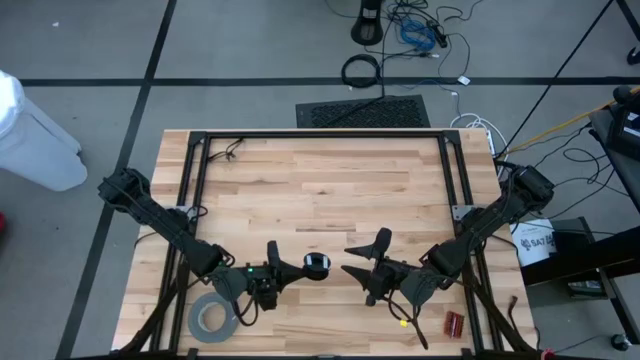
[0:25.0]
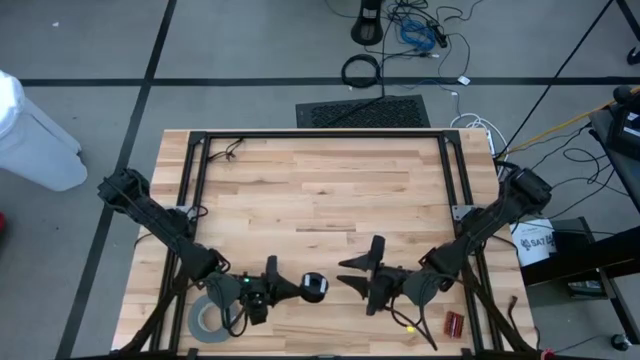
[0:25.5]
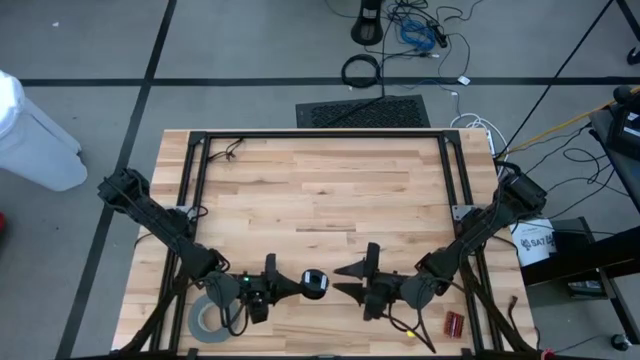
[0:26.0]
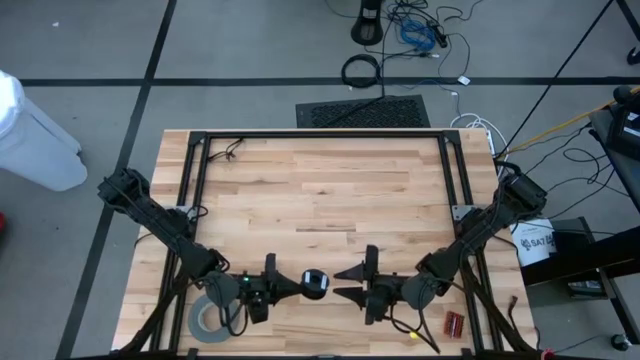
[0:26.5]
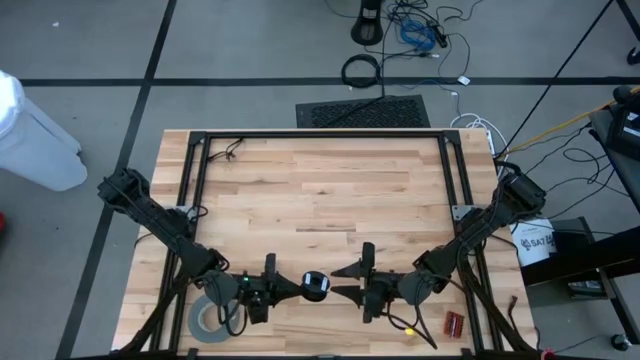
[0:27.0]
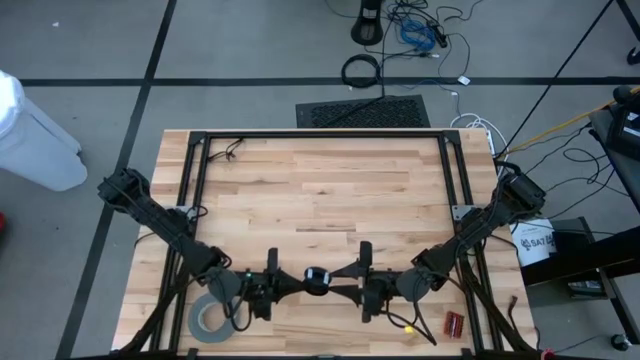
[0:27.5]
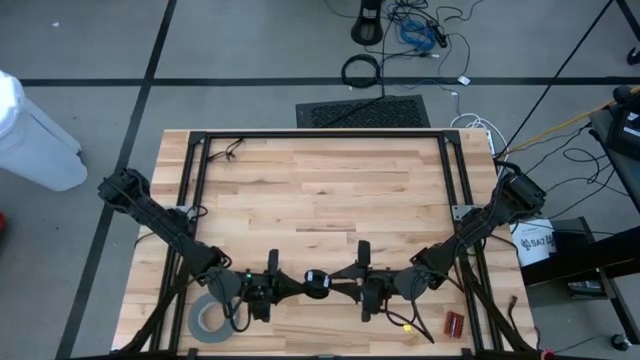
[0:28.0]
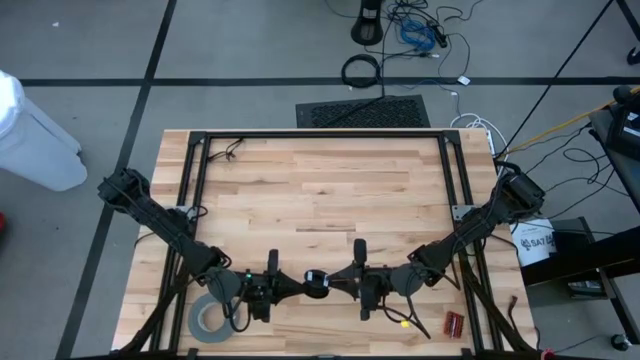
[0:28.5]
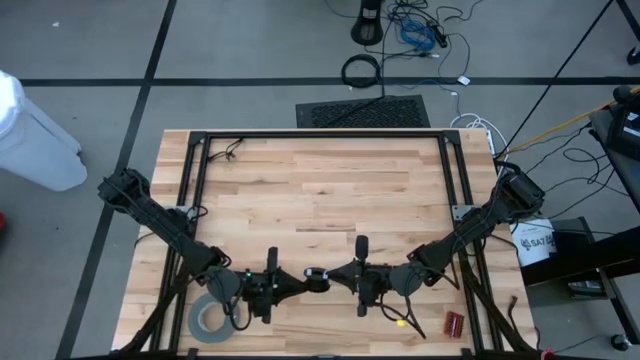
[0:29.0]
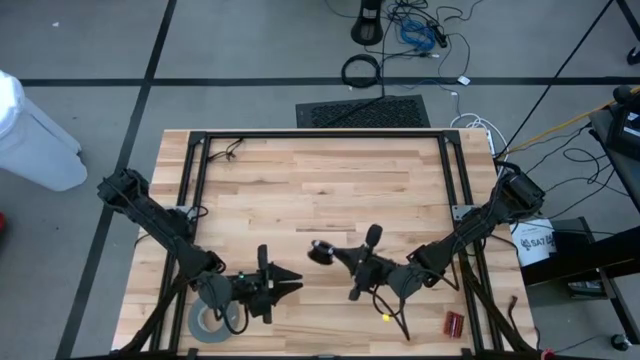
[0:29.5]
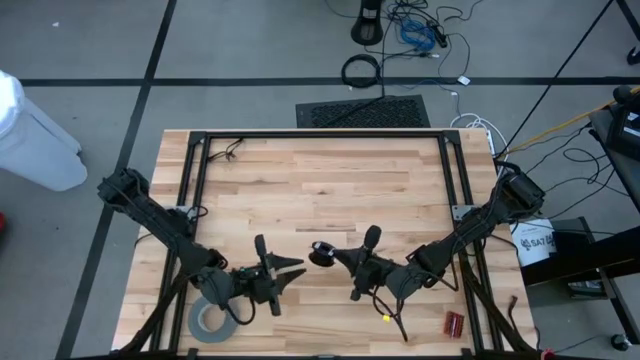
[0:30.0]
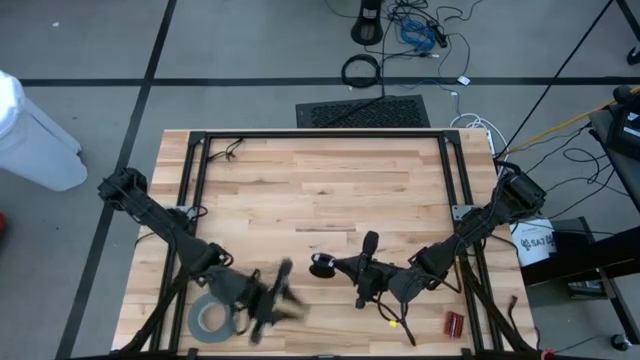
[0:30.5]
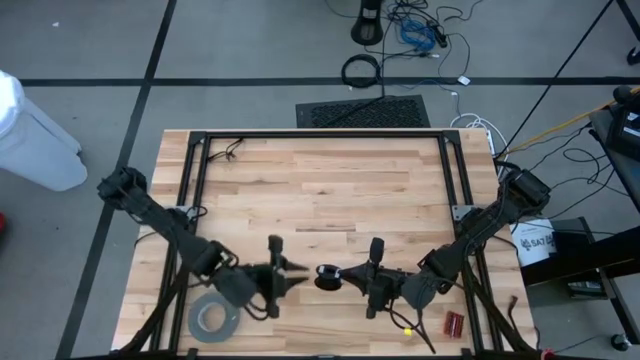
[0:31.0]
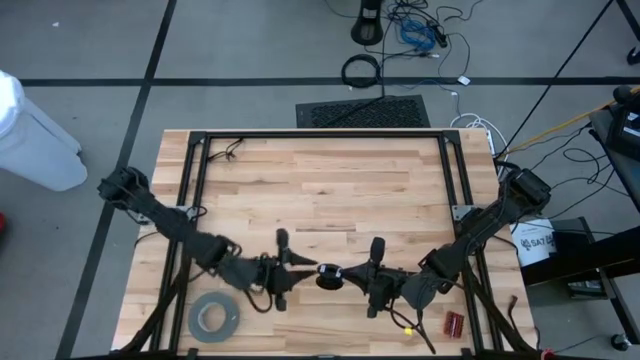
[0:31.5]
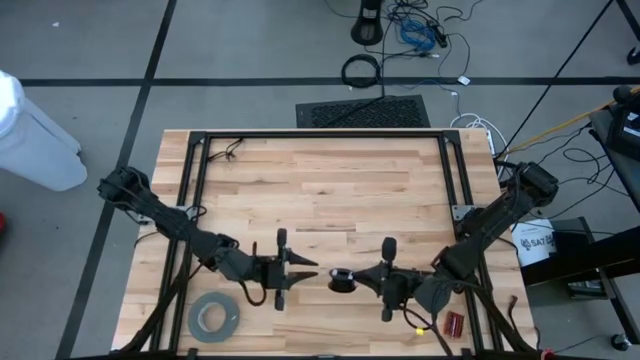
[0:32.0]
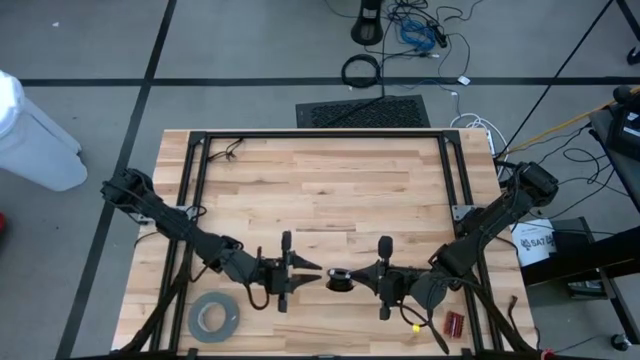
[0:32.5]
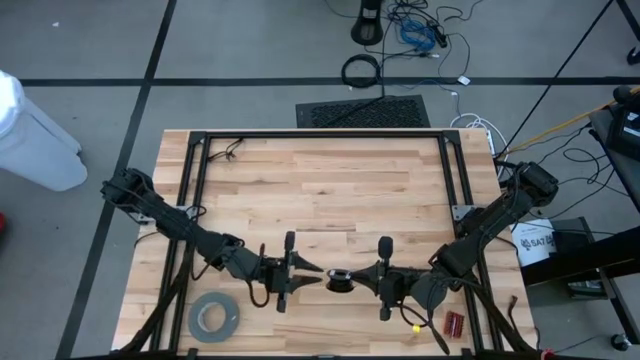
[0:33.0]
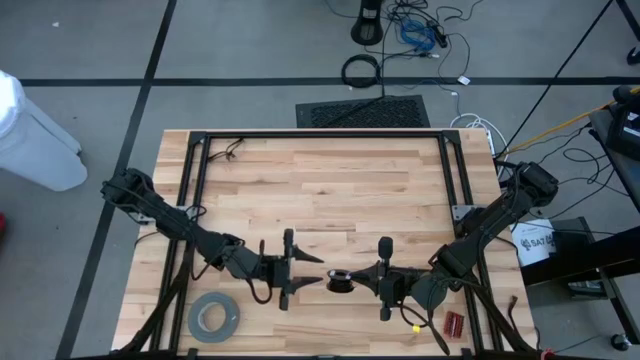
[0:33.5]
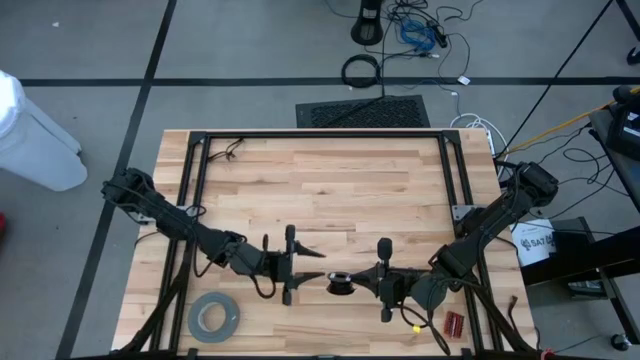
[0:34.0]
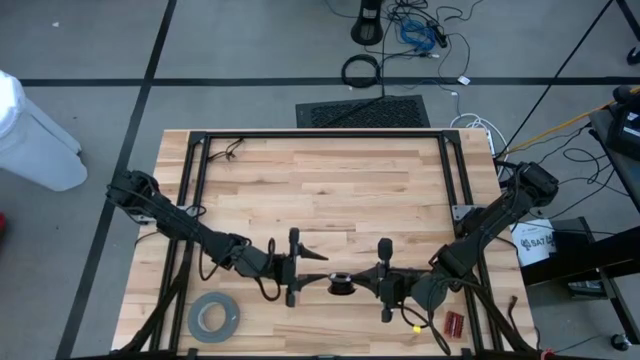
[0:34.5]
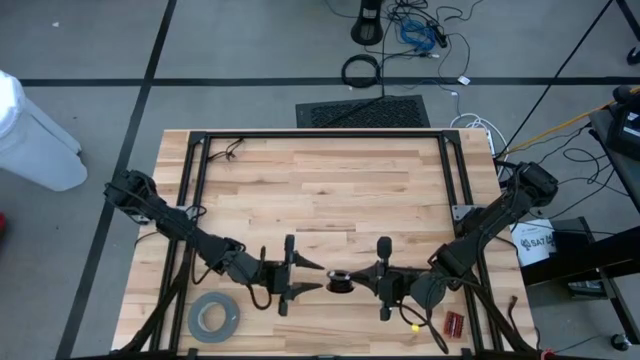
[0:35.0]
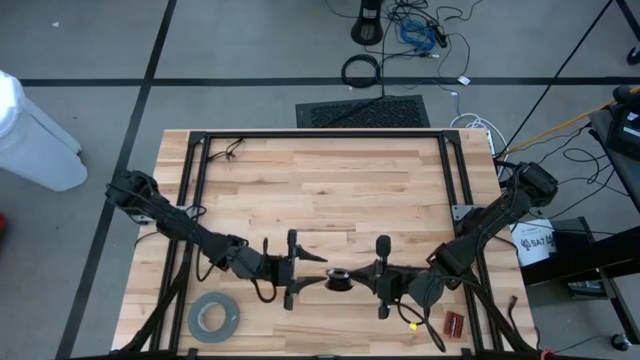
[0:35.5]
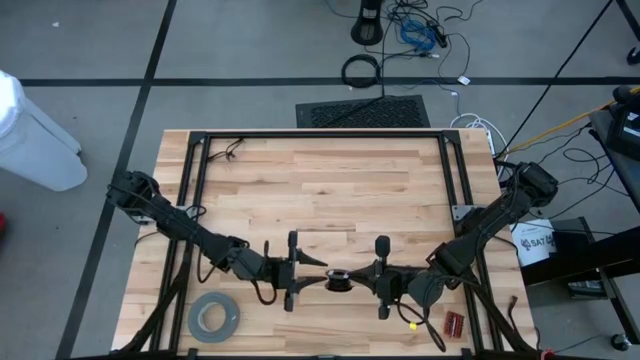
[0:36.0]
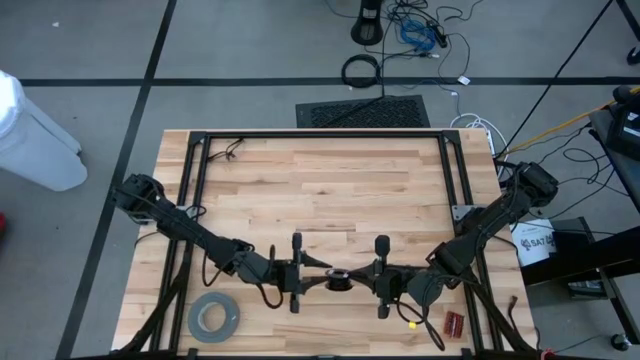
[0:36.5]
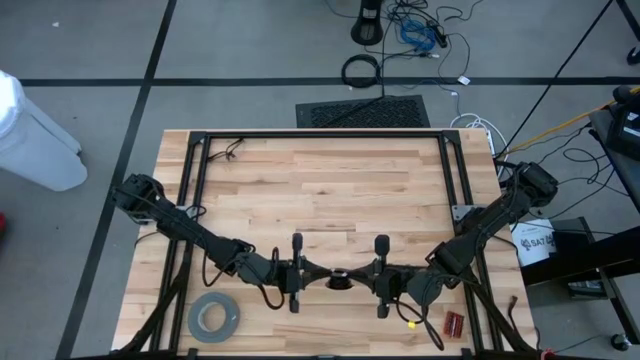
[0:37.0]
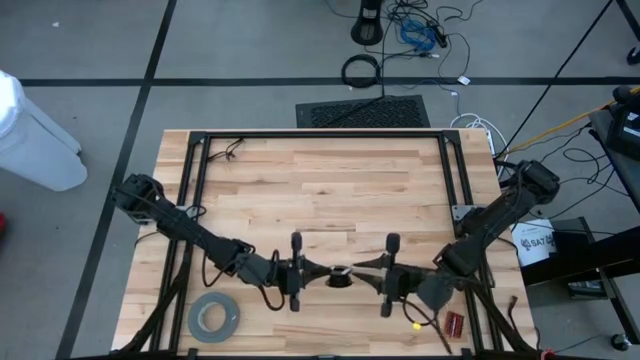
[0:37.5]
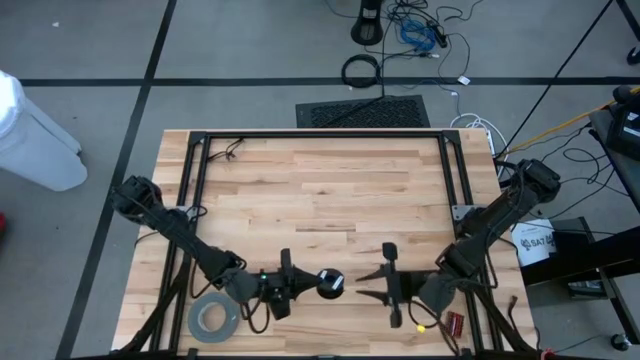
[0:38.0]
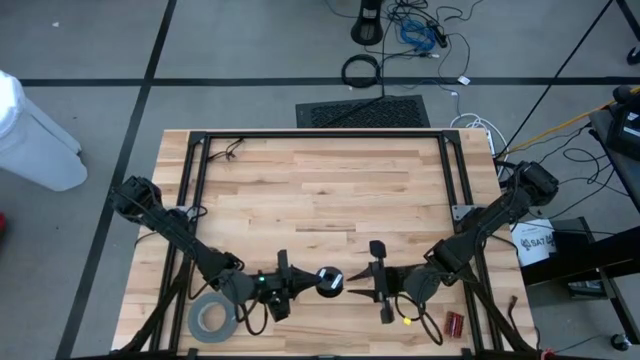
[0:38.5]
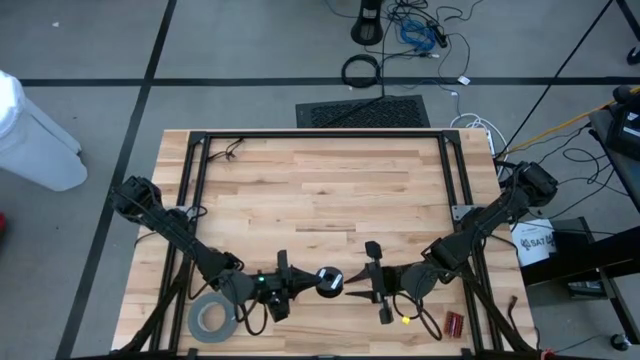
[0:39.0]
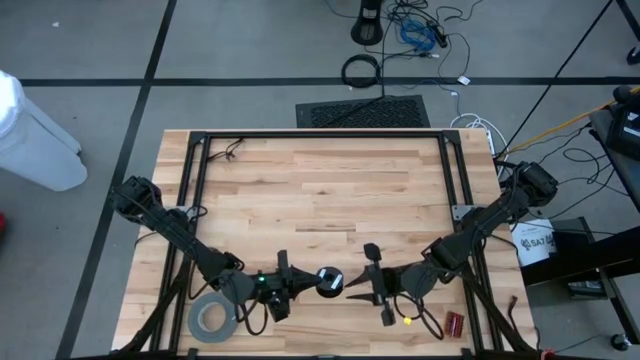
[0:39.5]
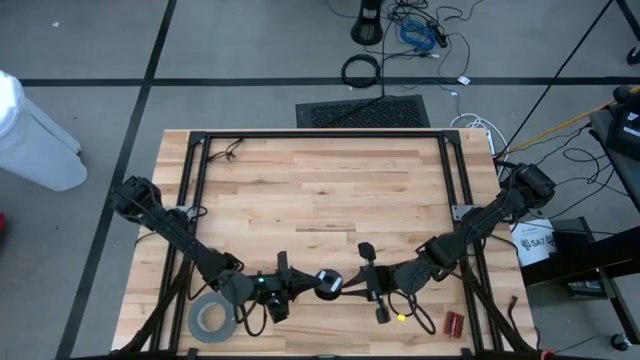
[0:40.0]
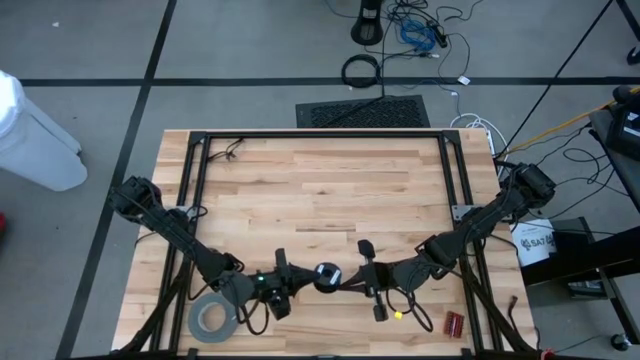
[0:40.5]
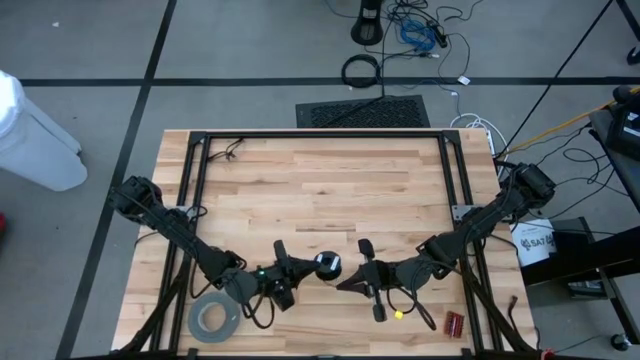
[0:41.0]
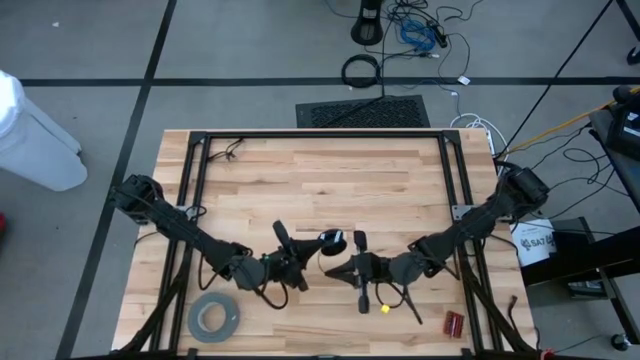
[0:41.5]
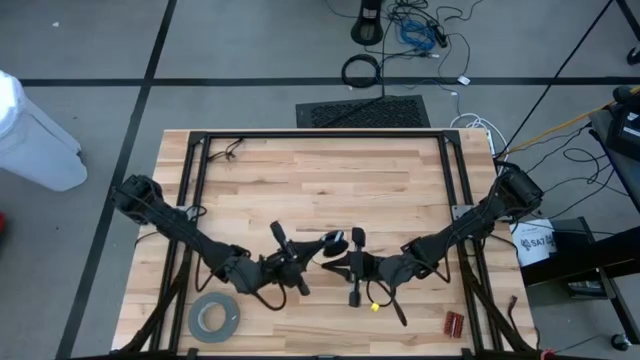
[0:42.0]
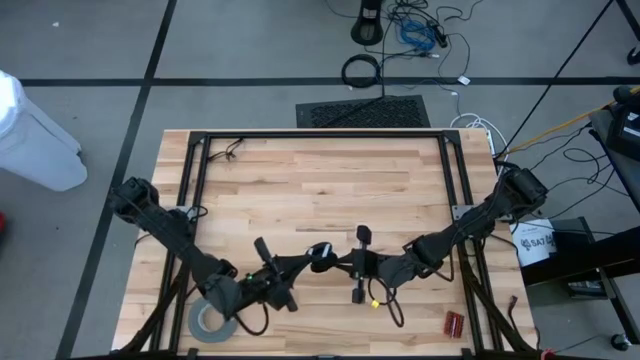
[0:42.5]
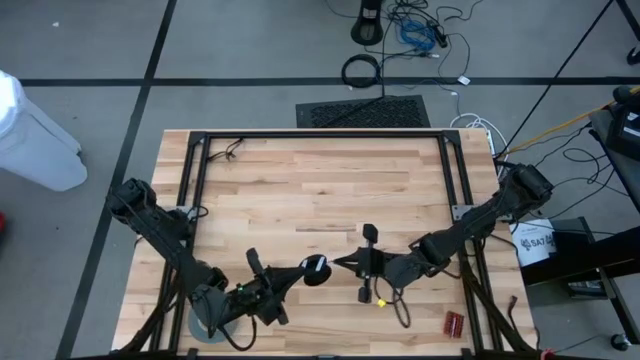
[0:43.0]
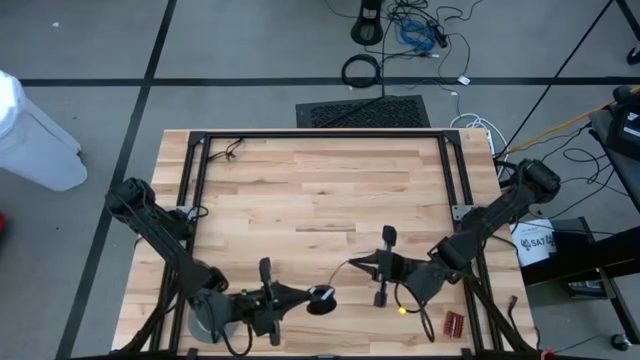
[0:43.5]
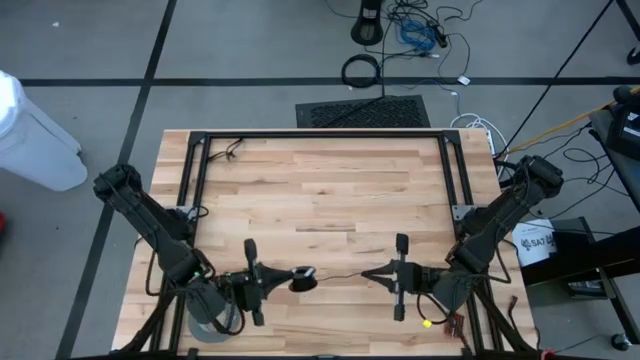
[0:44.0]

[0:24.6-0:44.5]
Task: Coil cords
Uncoil the black wire from the spool
